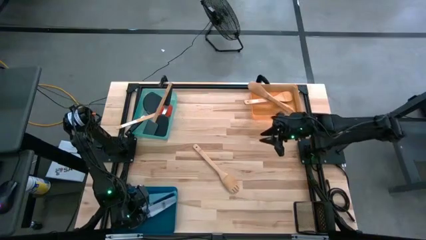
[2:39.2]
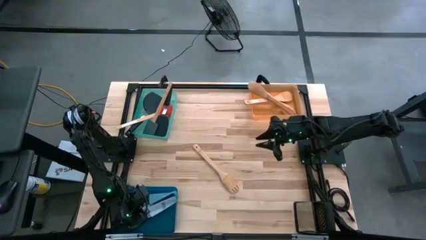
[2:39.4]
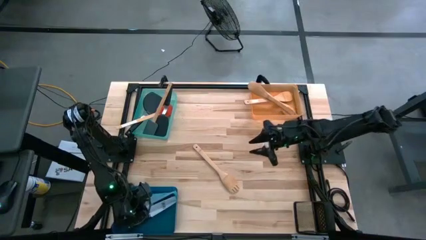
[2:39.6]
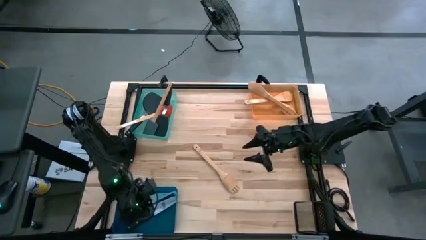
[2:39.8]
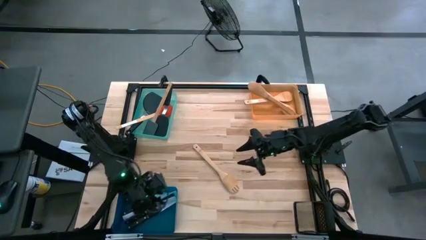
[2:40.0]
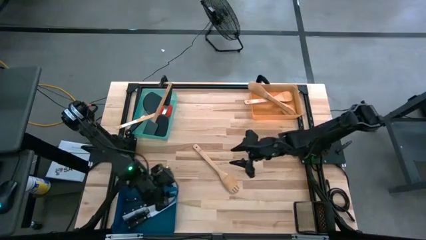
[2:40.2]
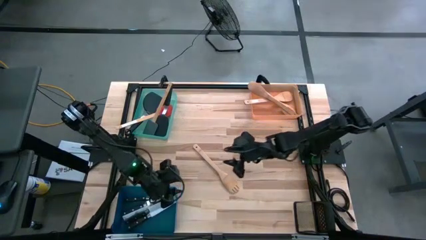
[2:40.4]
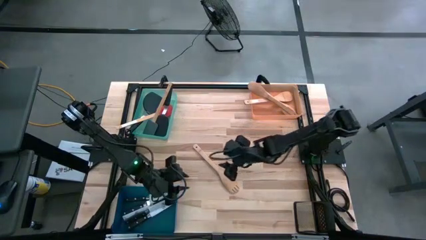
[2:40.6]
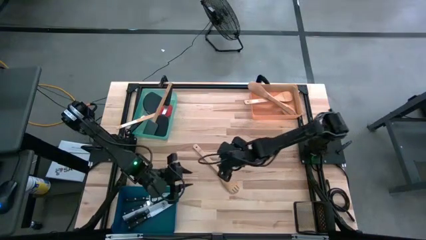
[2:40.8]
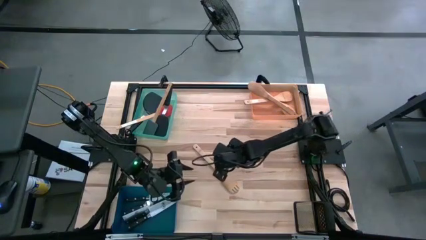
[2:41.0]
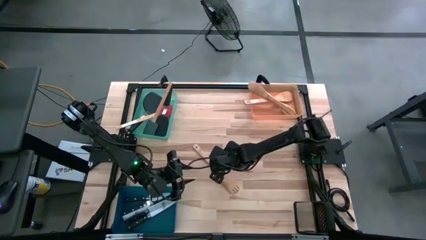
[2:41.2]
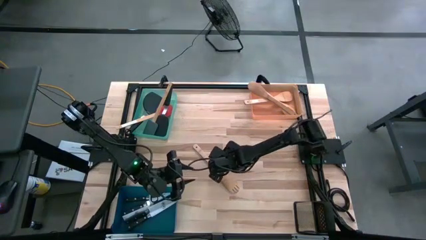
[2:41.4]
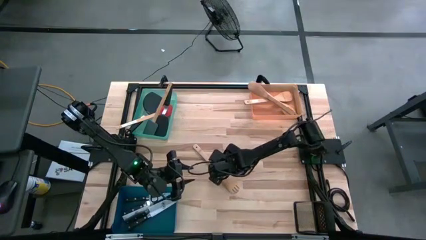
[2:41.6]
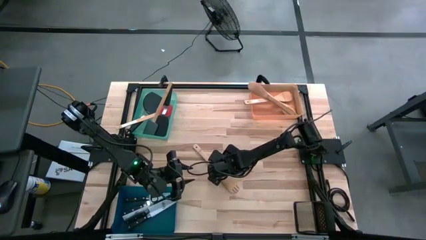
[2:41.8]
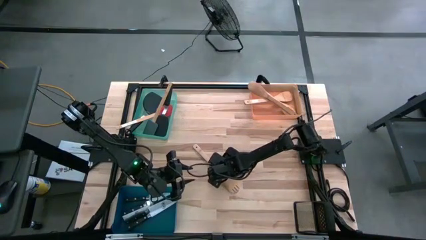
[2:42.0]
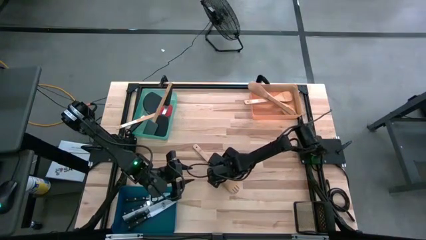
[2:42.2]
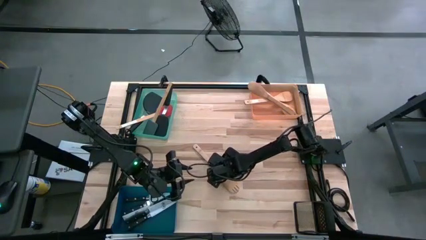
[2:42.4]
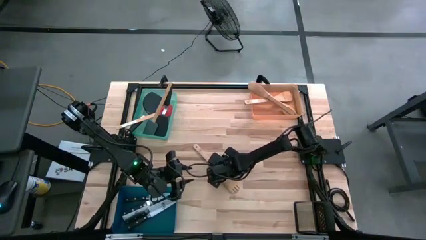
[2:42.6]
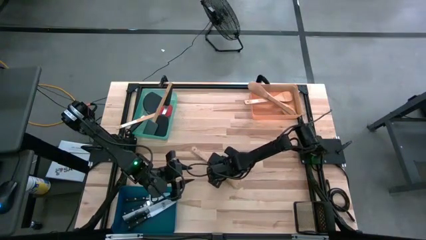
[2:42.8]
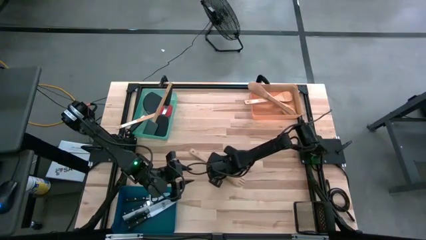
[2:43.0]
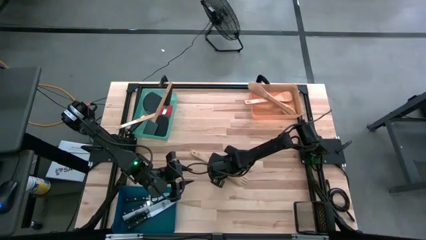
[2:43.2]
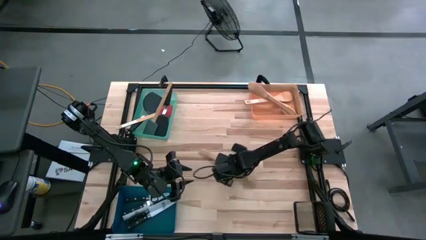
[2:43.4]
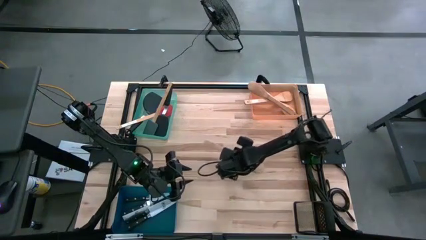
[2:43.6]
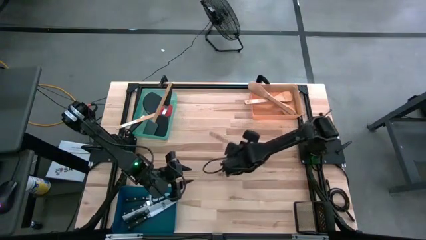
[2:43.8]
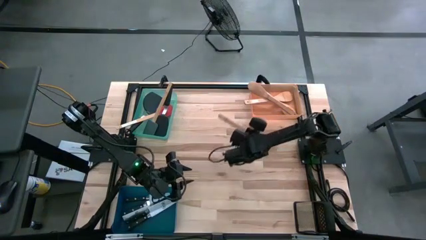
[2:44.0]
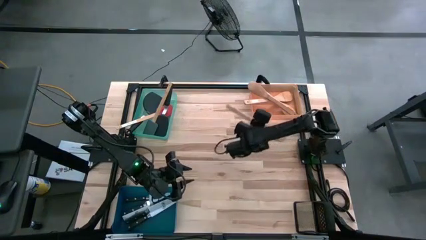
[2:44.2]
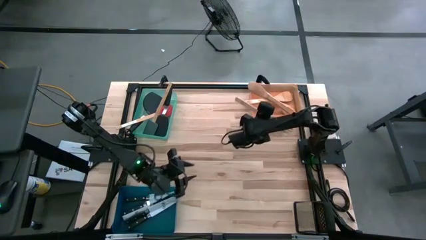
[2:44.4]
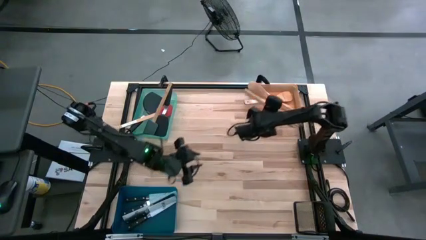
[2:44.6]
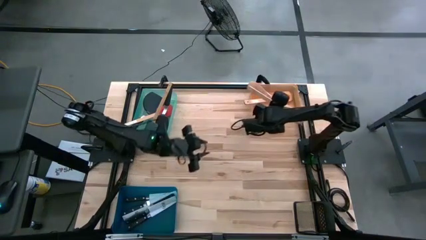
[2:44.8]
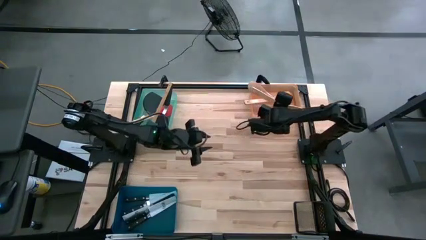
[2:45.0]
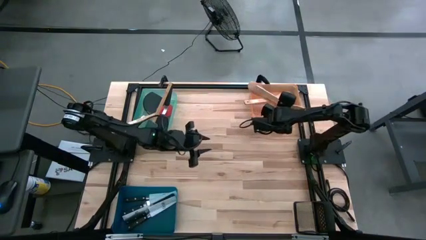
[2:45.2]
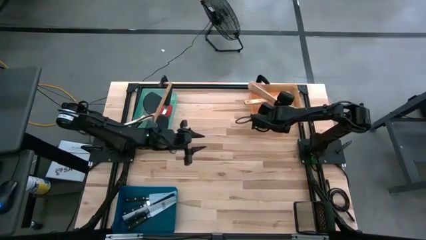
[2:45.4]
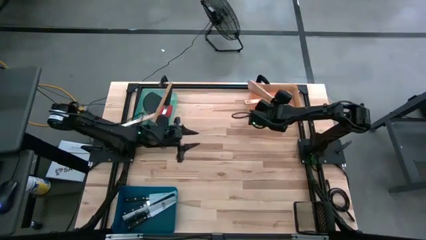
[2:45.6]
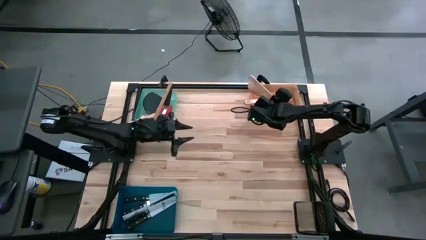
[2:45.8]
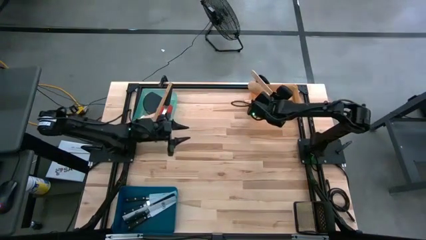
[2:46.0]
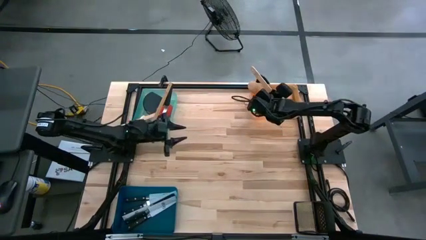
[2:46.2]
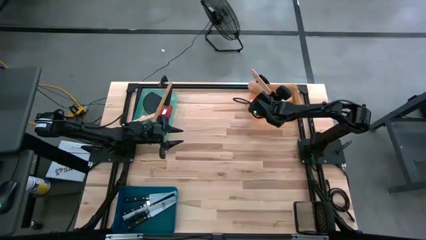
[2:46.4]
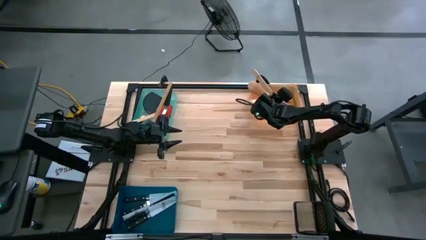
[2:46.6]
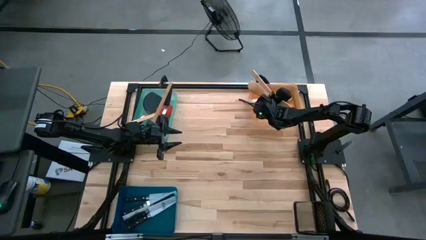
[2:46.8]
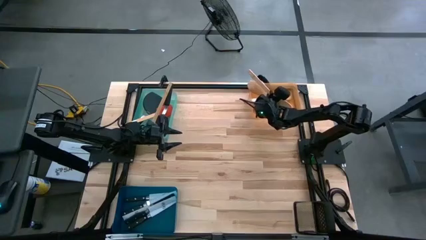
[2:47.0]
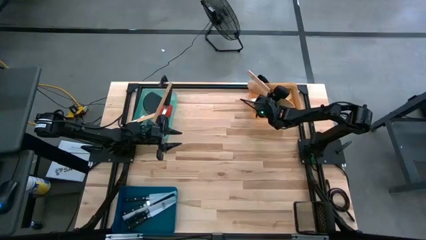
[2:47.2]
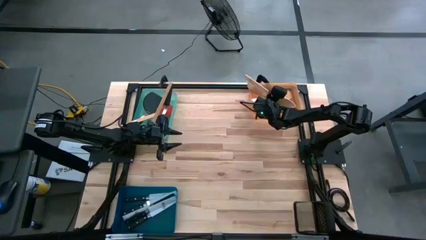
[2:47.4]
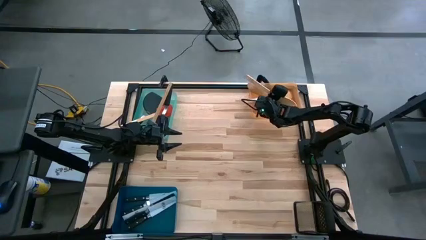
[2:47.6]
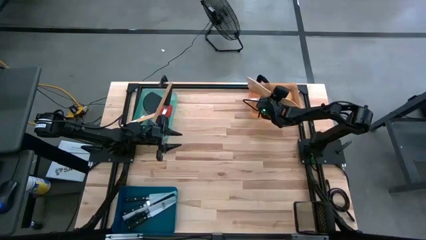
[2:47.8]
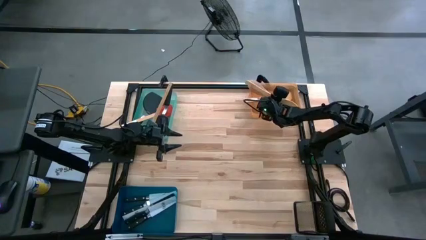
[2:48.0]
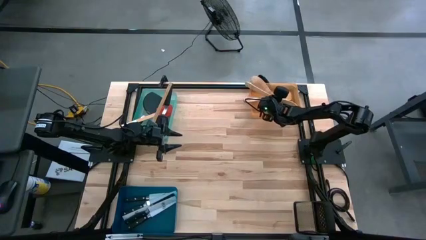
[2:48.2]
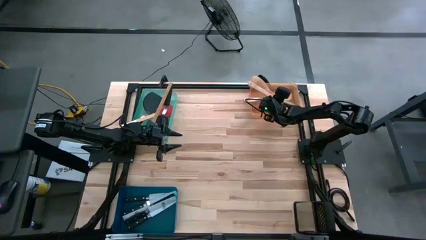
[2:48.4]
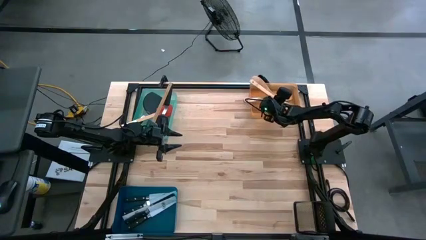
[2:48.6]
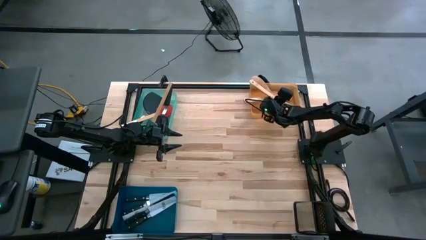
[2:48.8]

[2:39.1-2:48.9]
Task: Pick & Place Kitchen Items
Put the brown wooden serving spoon into the orange bin

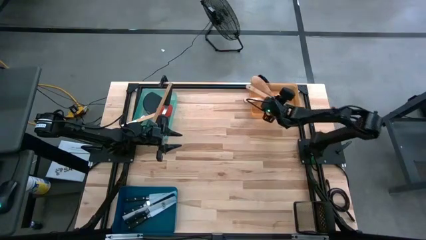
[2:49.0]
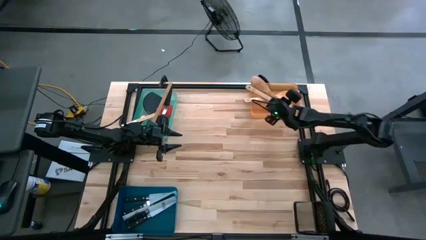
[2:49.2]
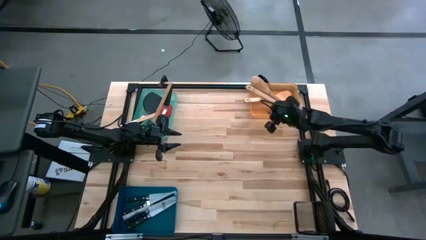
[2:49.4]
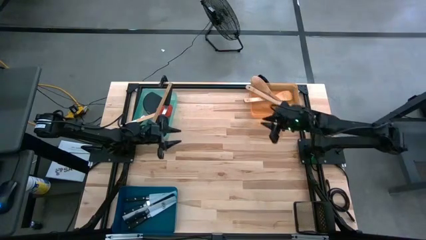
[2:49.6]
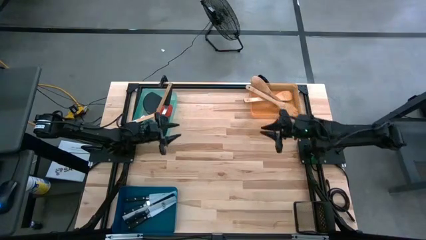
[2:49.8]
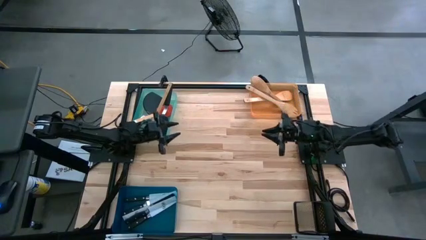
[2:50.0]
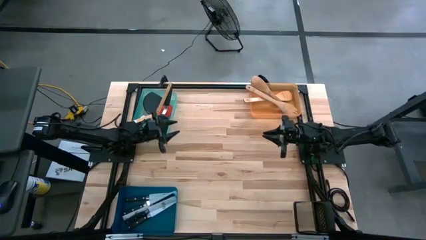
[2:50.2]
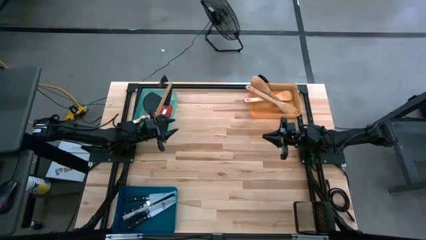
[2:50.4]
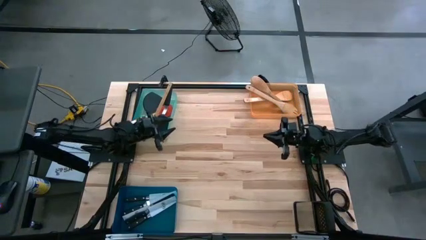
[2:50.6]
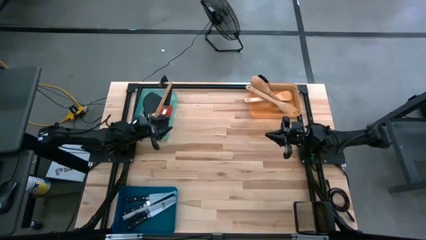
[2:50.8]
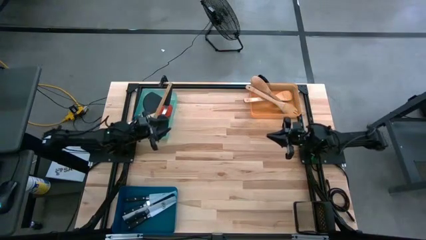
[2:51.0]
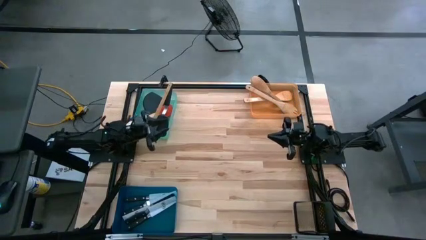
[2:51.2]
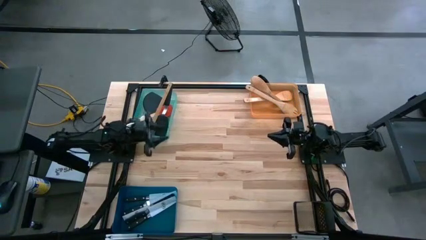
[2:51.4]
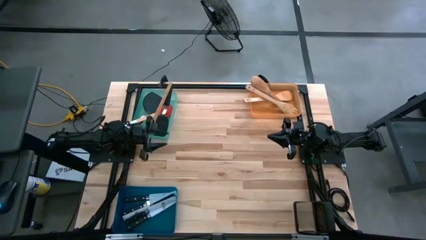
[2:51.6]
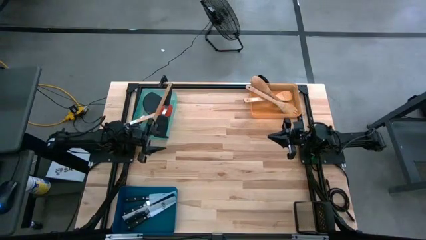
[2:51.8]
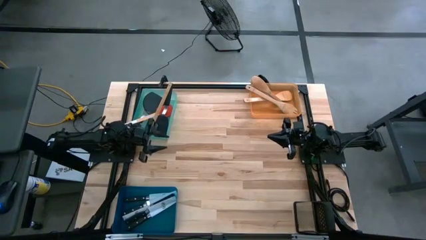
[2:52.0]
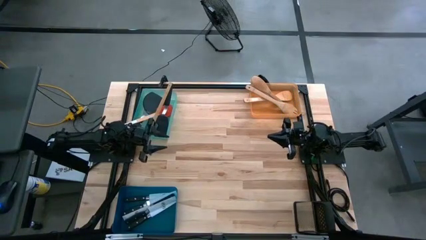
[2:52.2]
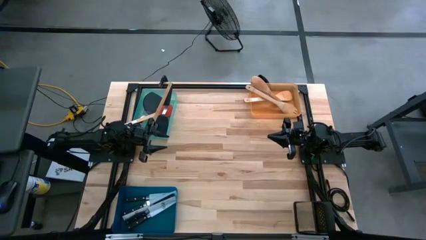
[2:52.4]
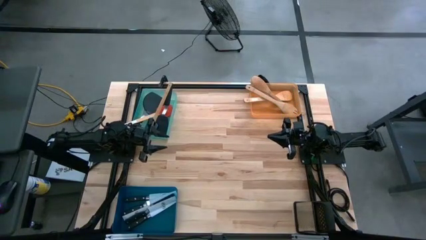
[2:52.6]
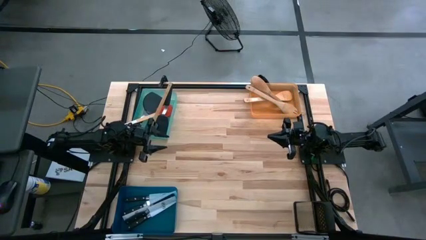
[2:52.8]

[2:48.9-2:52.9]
Return to Home Position
